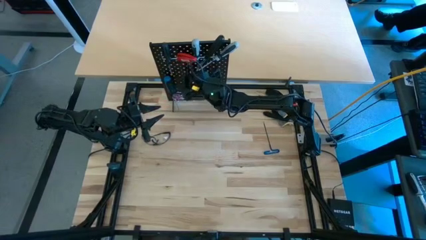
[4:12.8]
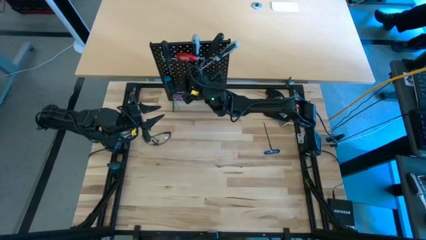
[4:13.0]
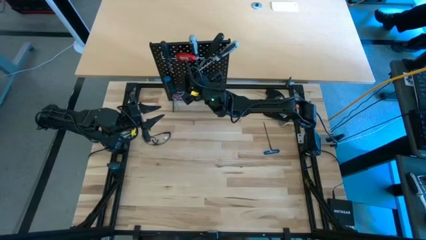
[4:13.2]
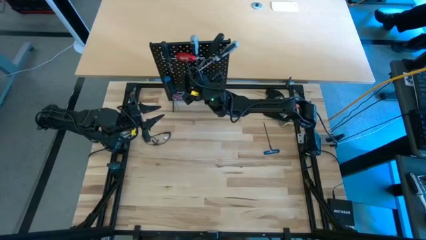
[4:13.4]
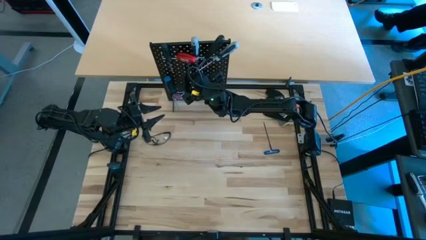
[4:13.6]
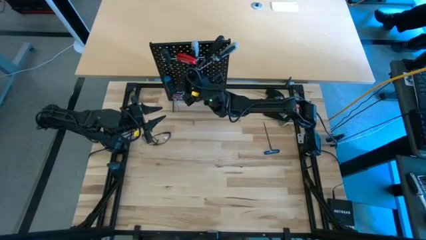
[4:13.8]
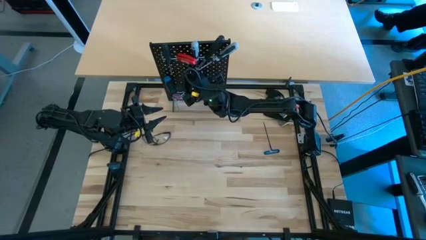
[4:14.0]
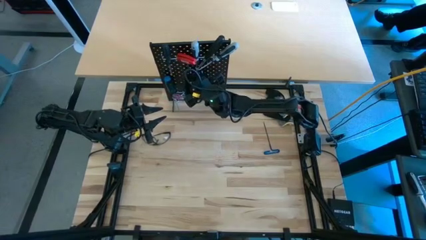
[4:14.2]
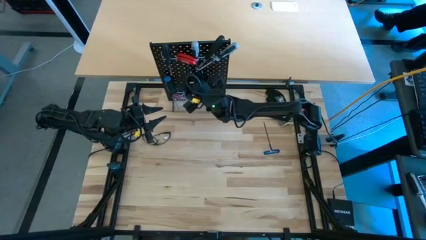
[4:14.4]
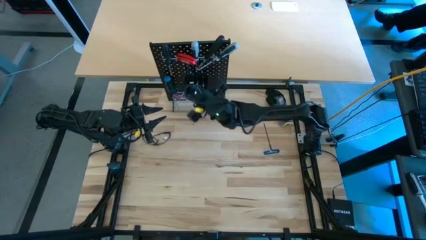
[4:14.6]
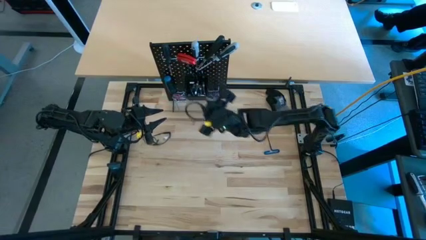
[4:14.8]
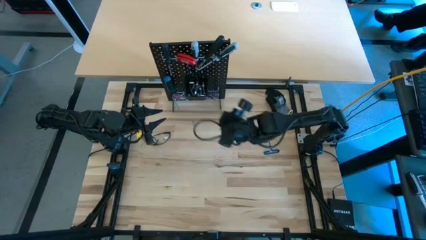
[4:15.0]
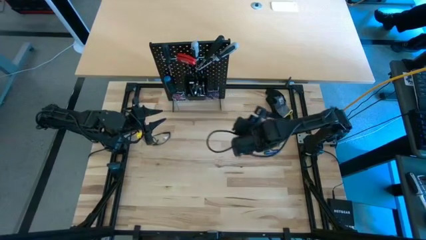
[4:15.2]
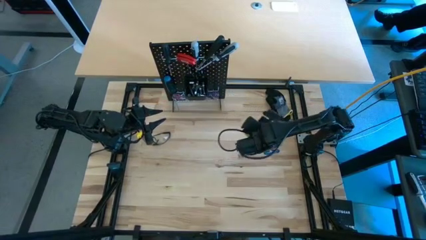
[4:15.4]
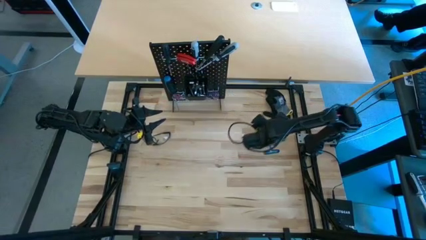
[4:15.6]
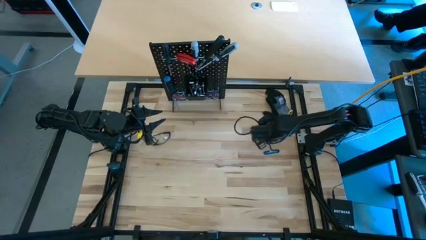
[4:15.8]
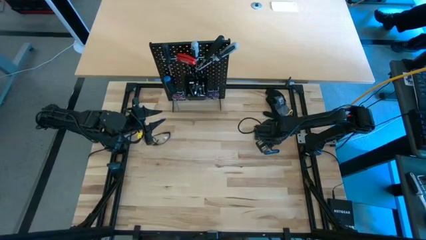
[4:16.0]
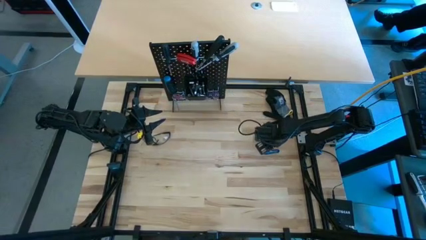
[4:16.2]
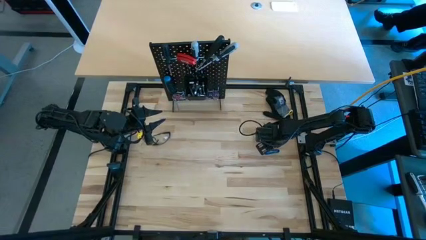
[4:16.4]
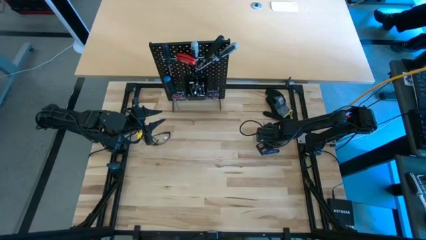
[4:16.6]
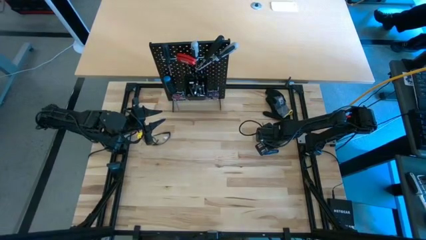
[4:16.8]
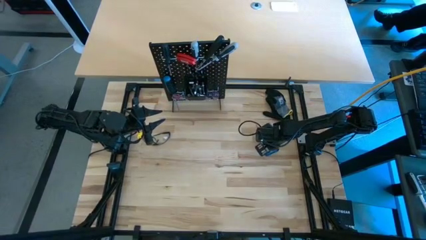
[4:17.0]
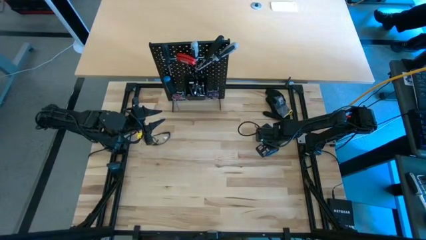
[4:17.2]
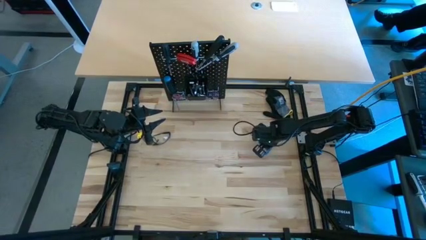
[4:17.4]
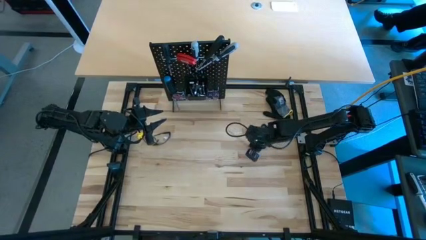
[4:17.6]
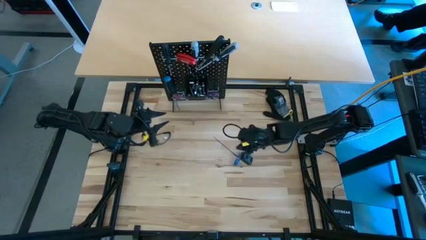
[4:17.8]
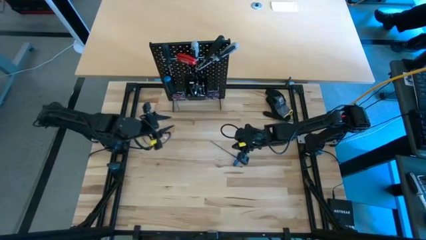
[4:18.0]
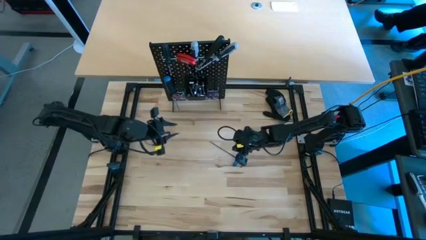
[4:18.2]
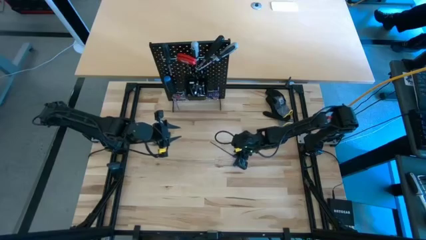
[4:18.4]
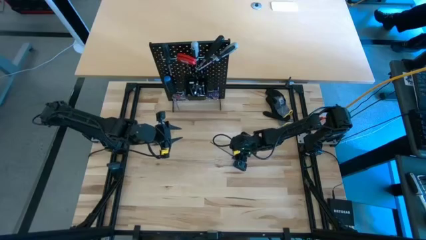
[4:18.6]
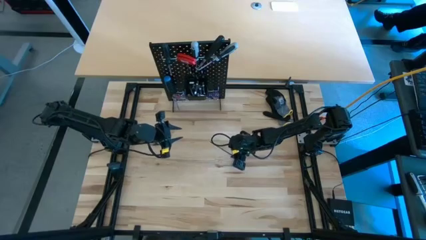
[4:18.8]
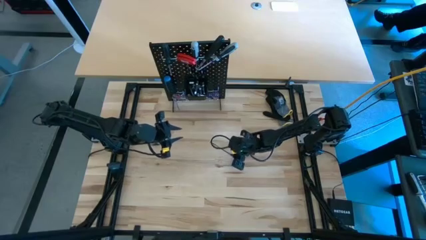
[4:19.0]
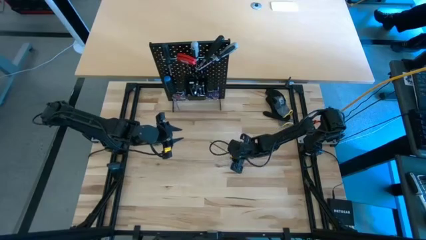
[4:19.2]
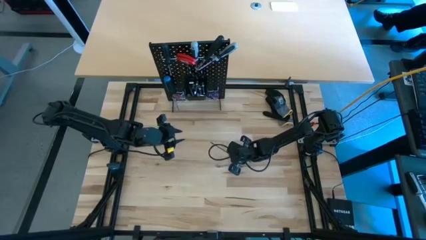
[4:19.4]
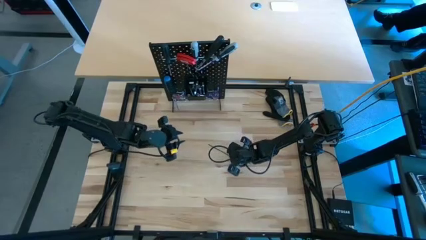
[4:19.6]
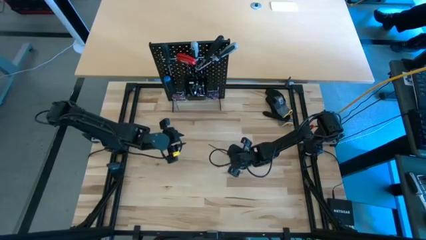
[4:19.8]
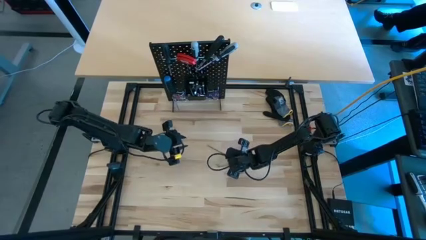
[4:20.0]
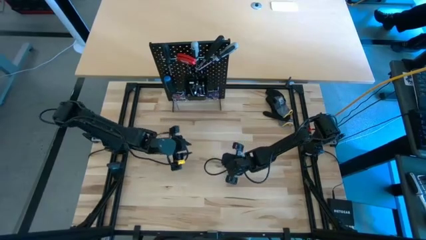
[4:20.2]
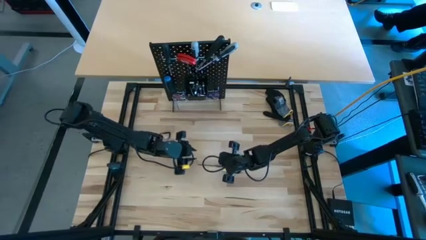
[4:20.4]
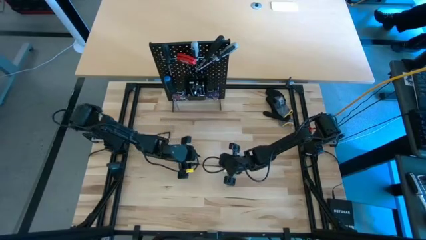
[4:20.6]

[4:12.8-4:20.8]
Task: Hang tools onto peg board
Hang the blue t-handle hex key on the peg board

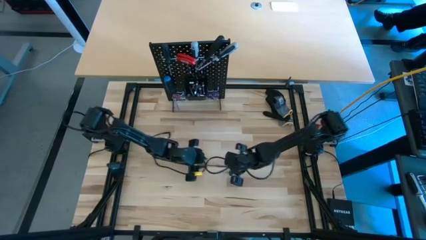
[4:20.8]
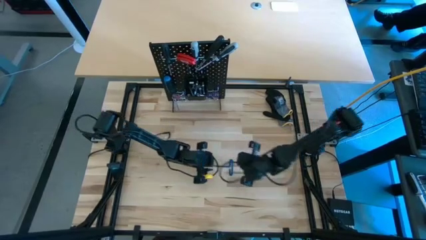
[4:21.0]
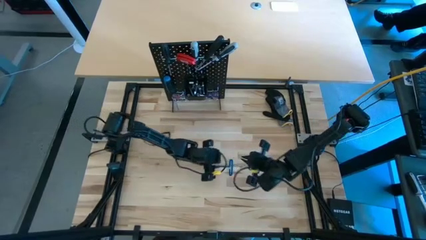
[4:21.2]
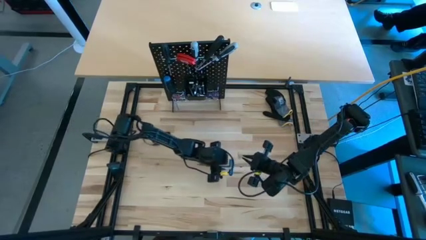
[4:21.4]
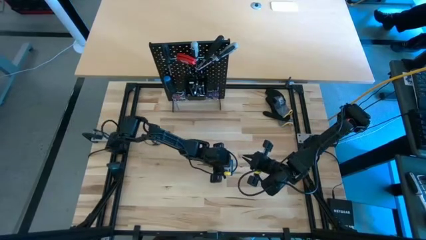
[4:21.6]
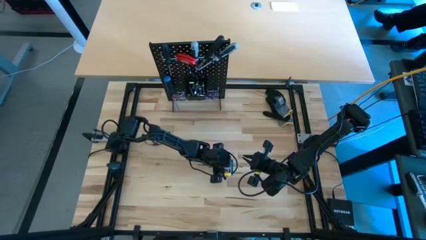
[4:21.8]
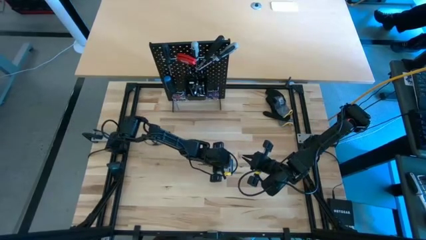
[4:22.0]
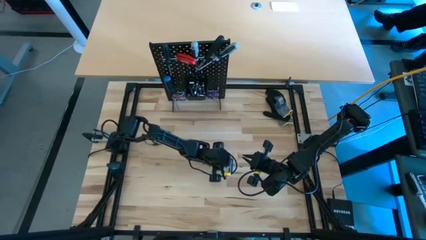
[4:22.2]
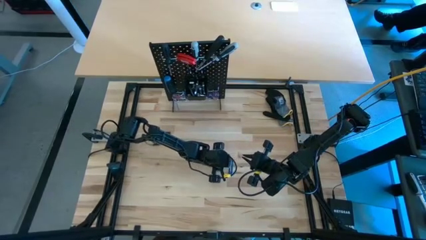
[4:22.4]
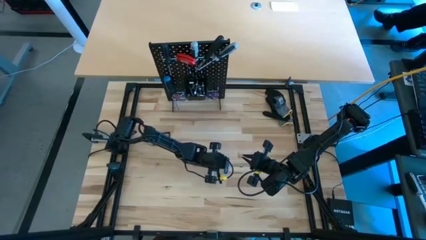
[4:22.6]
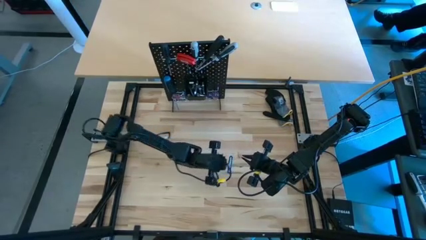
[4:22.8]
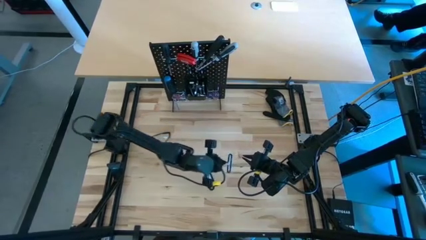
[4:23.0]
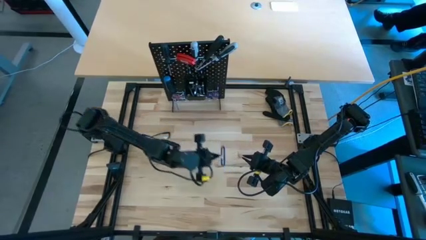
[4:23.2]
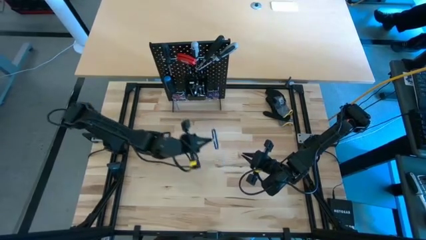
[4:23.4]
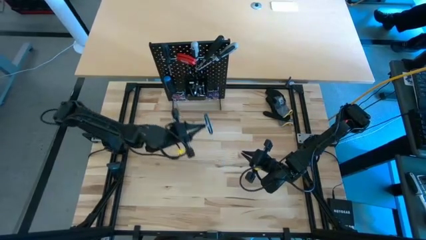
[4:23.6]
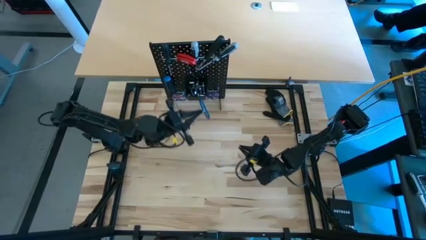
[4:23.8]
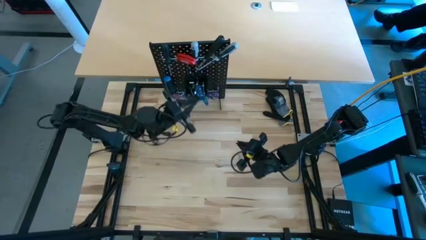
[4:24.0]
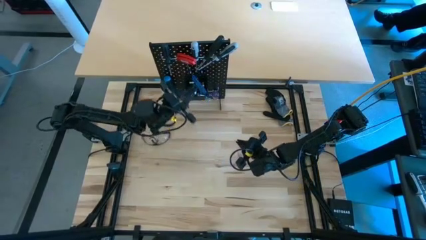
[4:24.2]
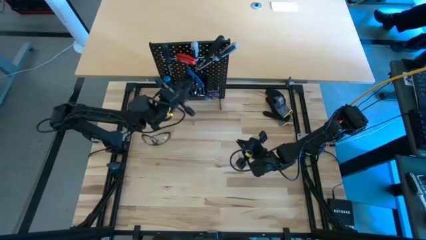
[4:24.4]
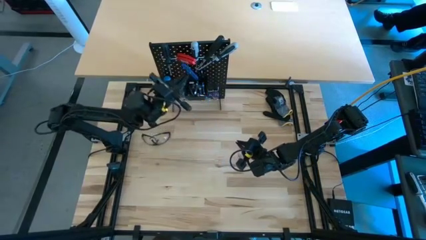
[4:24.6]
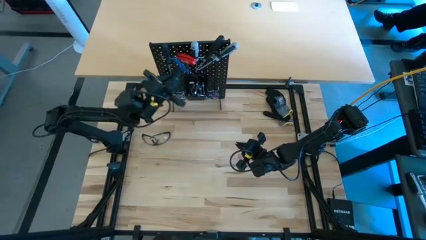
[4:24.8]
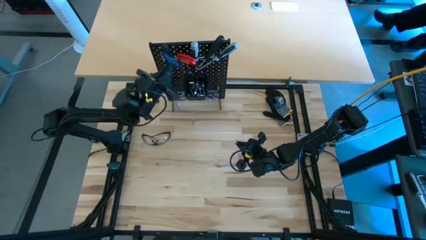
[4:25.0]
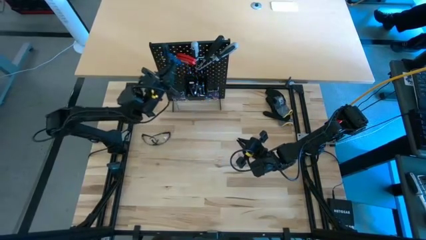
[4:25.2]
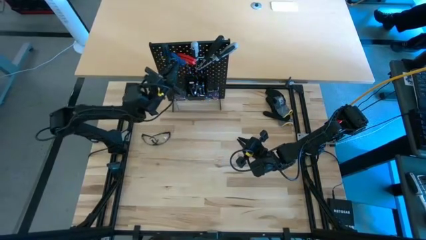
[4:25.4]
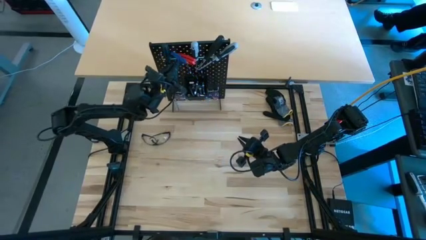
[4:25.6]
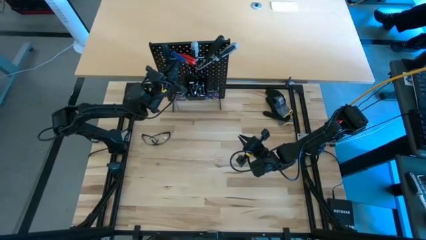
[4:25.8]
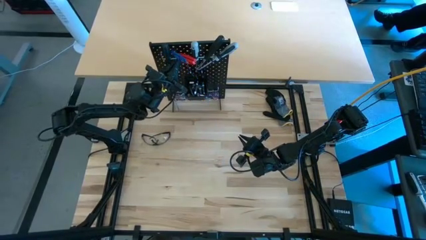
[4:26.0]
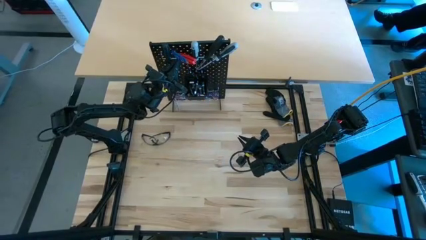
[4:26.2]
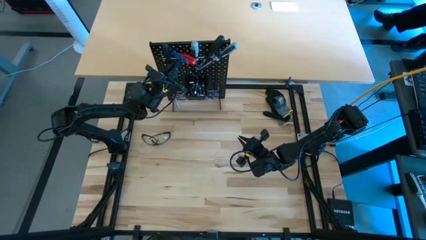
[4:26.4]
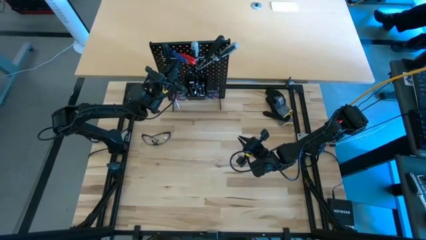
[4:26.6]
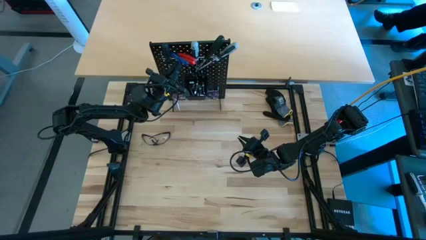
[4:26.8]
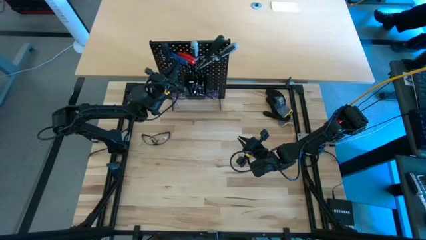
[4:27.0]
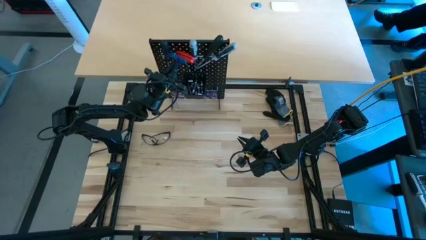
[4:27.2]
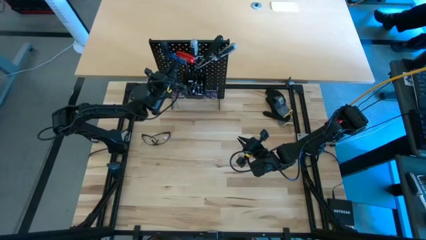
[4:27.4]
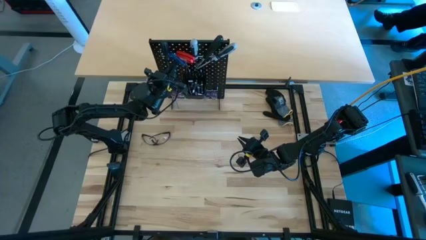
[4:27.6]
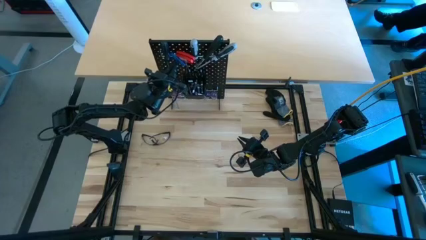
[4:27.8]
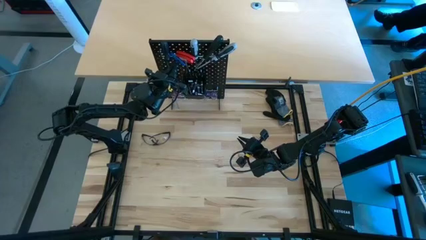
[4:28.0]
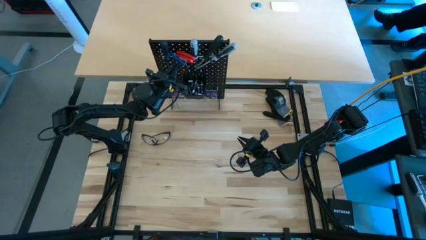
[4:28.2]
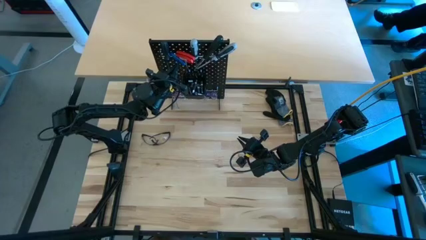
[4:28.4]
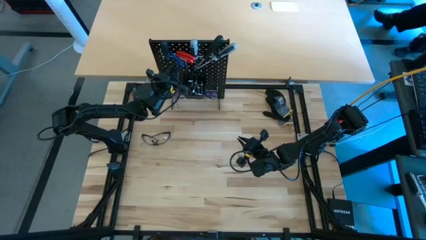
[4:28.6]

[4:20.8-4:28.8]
Hang the blue t-handle hex key on the peg board

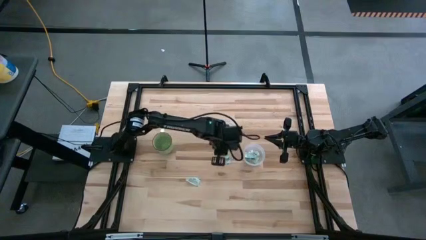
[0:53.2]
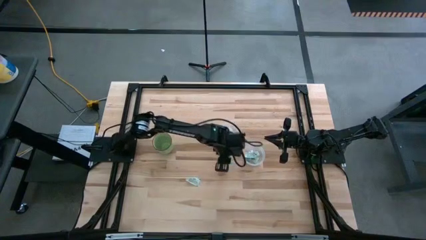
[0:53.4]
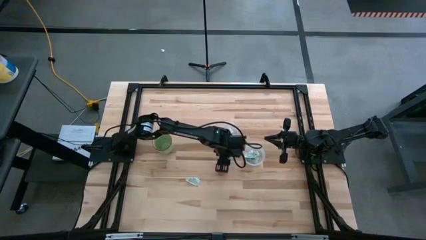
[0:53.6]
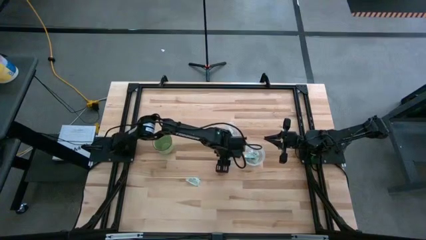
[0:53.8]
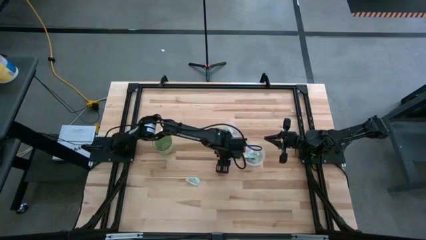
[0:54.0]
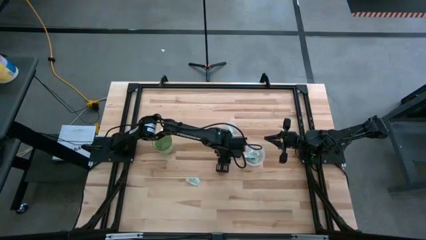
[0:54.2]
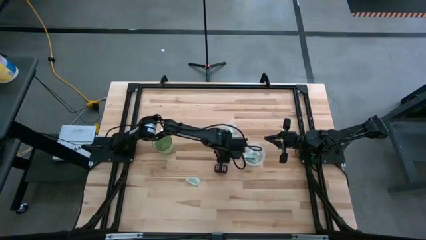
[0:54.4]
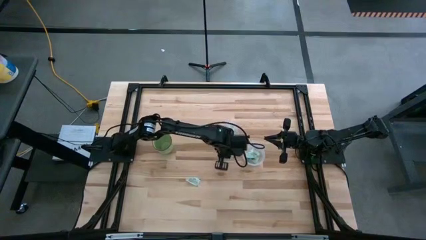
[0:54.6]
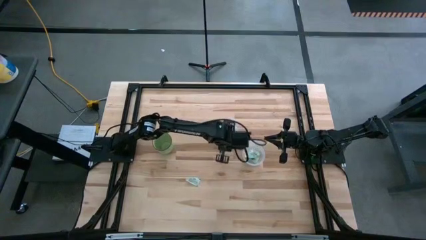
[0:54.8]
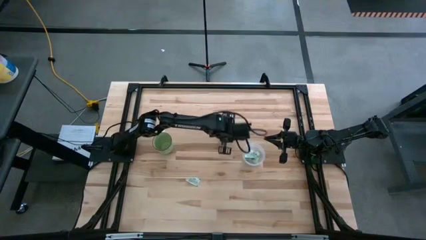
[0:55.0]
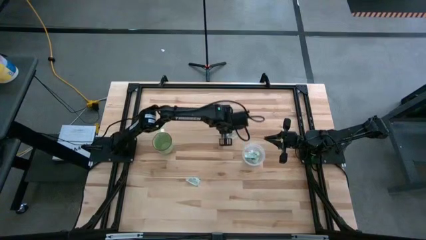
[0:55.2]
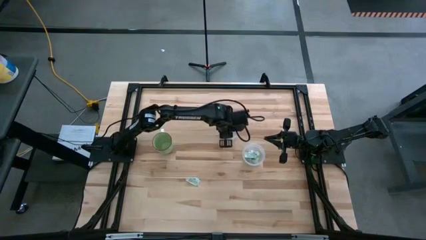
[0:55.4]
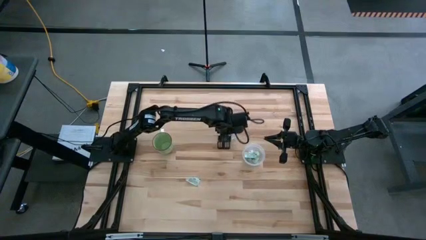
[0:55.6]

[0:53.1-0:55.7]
Task: Pick and place Stevia / Truvia into bins
Put the stevia packet into the top transparent container
